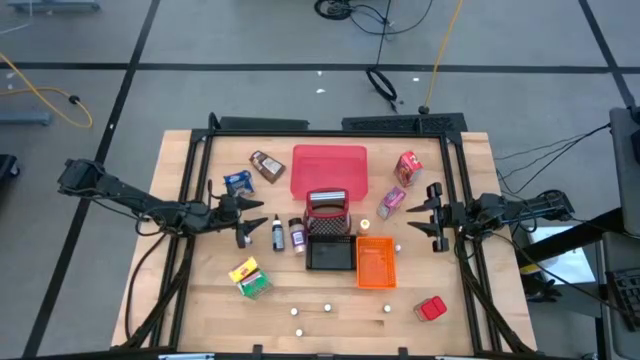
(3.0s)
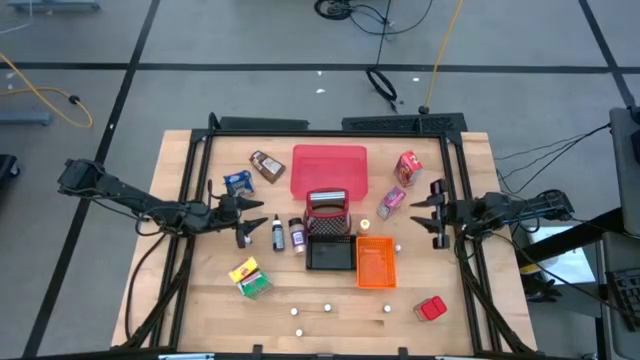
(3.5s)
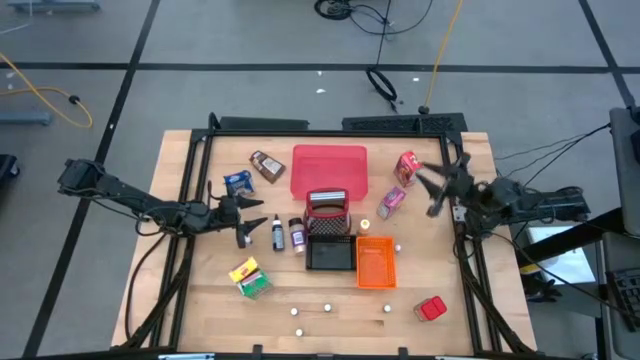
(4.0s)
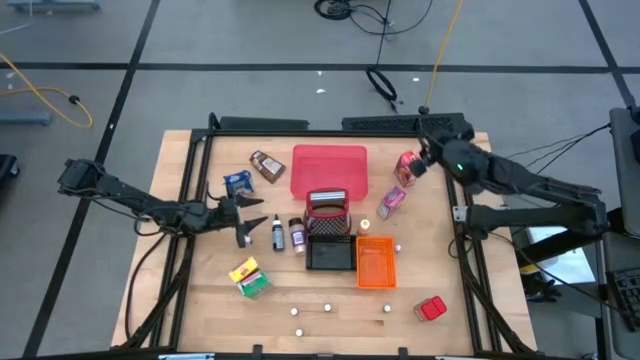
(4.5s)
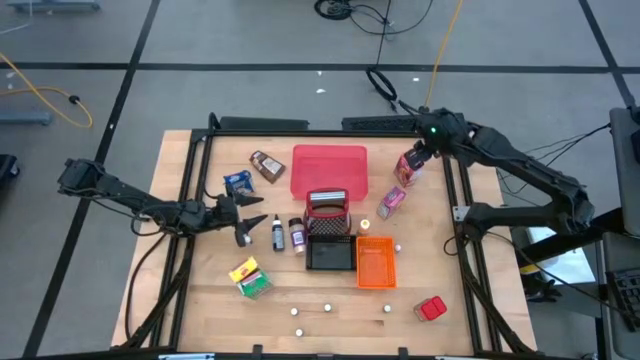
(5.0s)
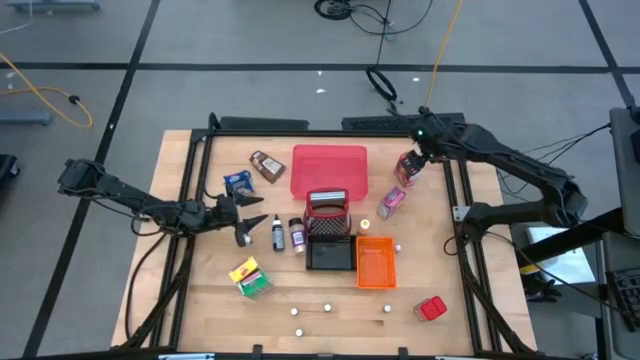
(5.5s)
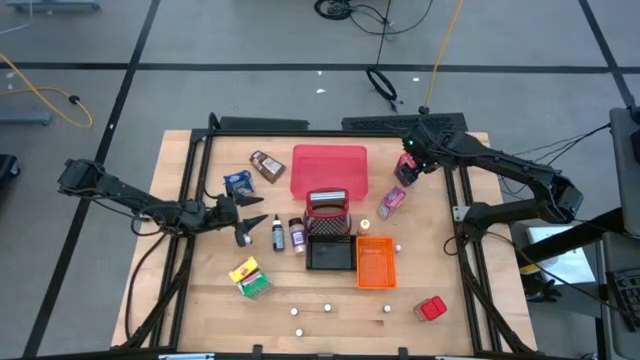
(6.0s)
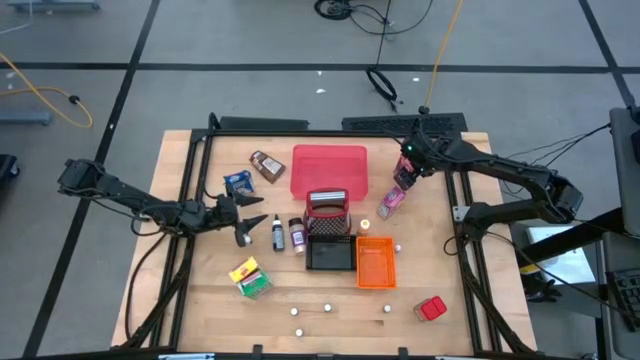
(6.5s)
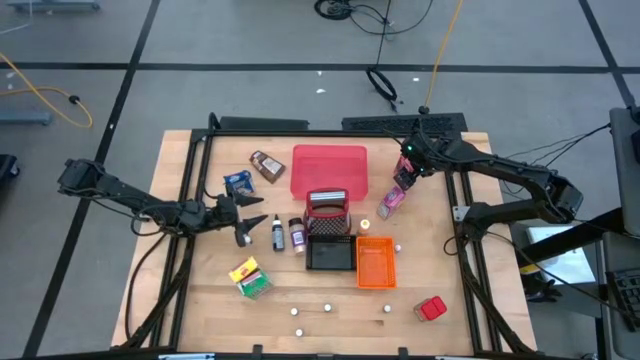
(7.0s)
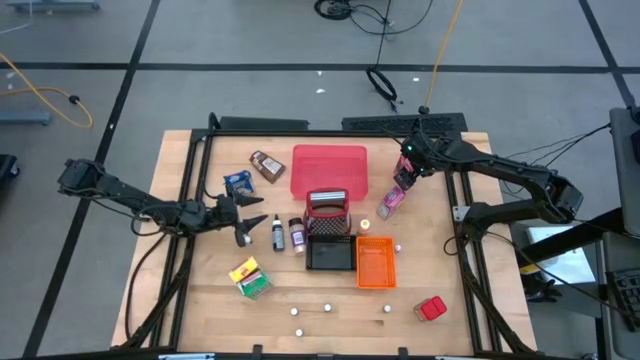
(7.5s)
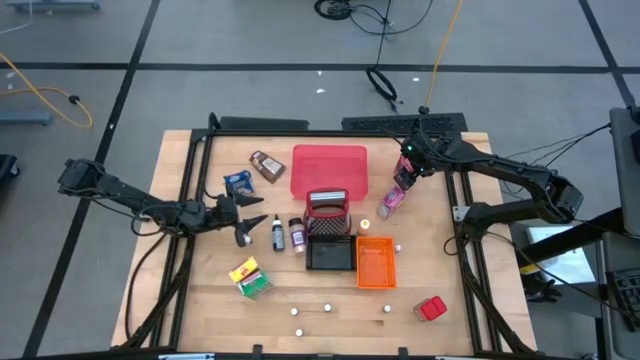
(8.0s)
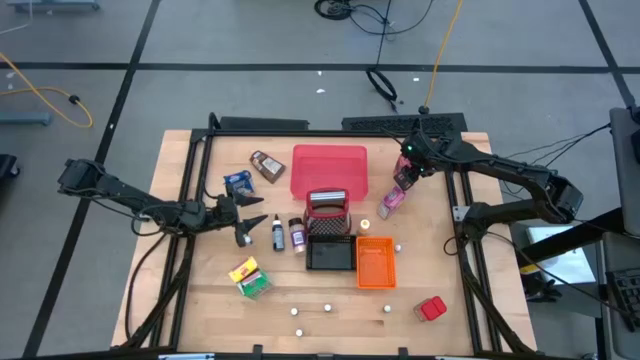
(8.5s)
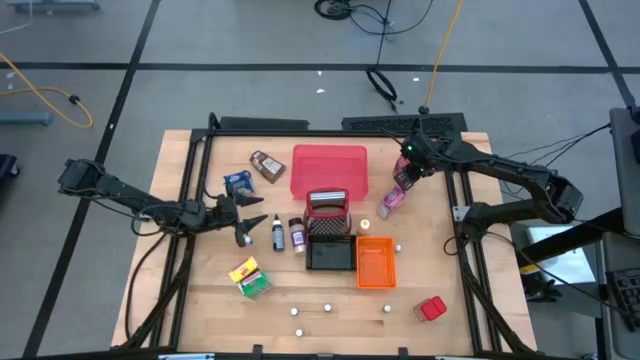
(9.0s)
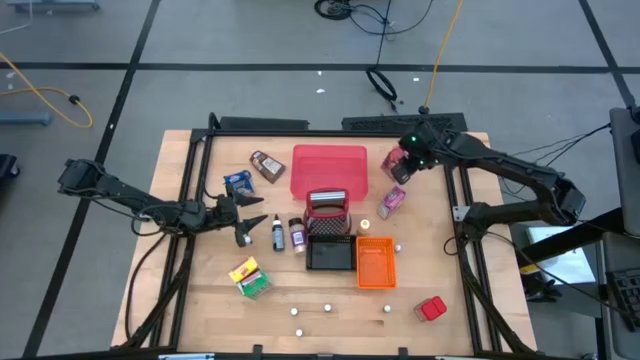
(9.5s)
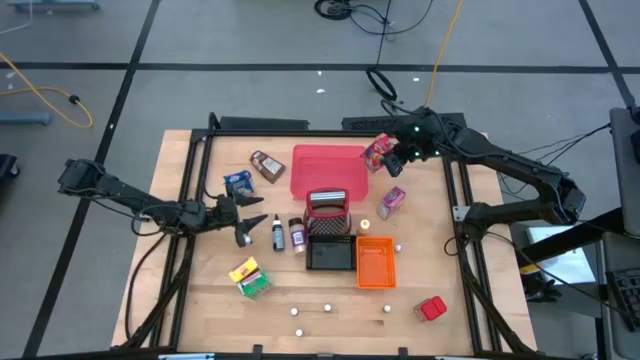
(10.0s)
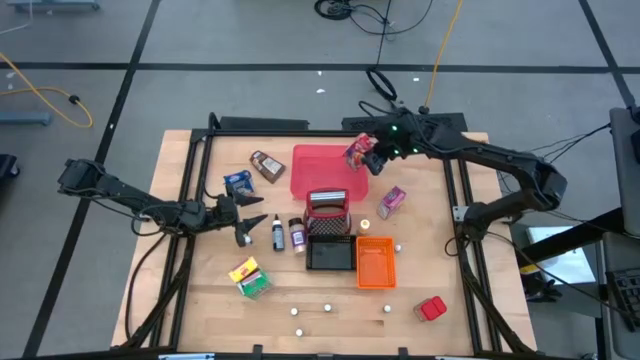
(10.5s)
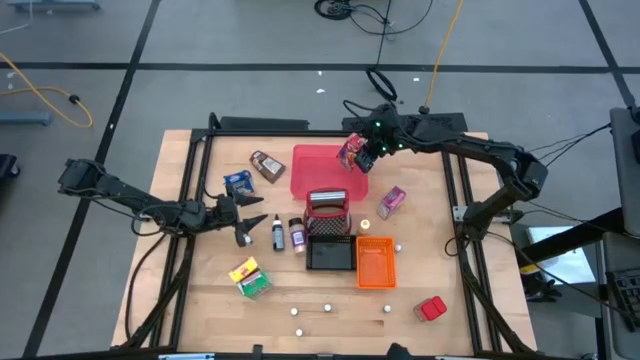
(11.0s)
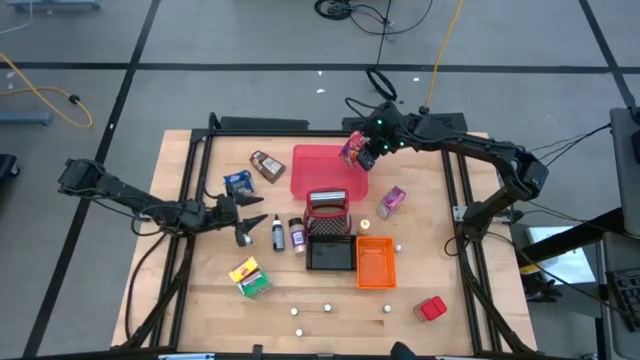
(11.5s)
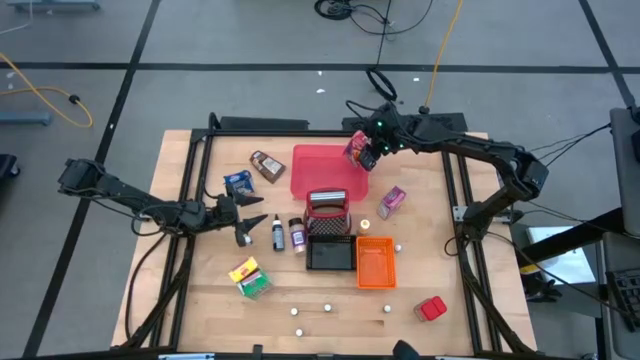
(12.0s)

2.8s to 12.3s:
Task: Pick & Place Kitchen Items
Put the red cereal box into the red bin

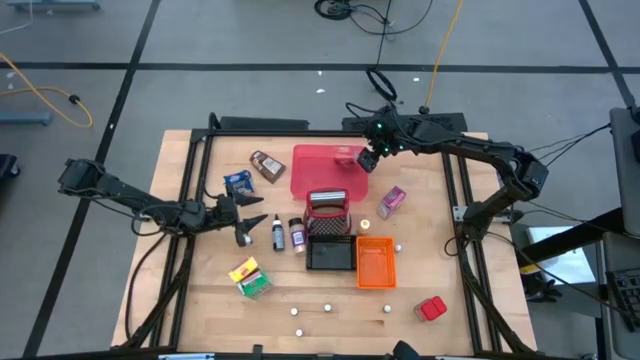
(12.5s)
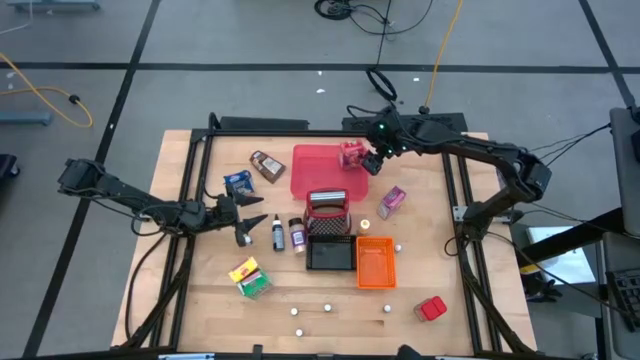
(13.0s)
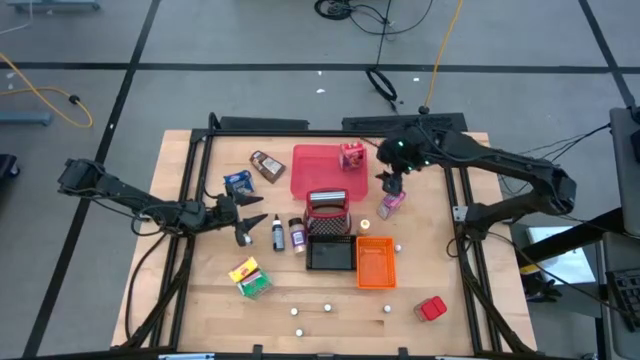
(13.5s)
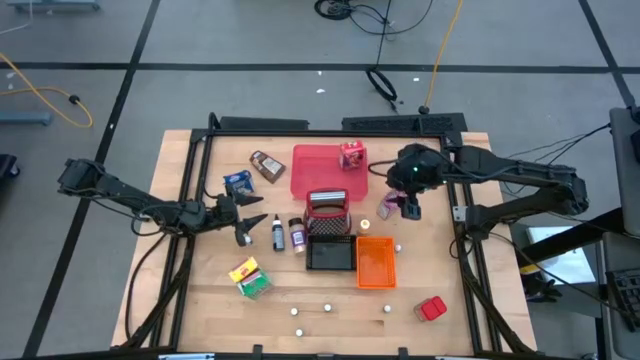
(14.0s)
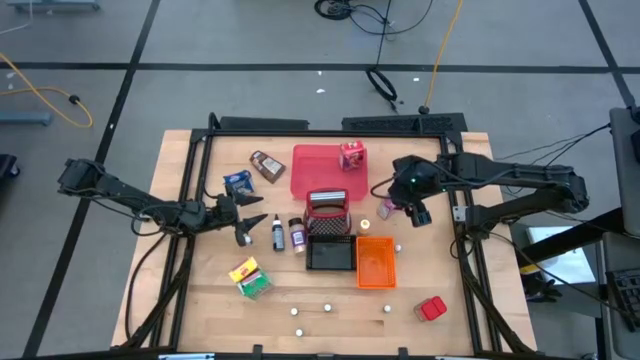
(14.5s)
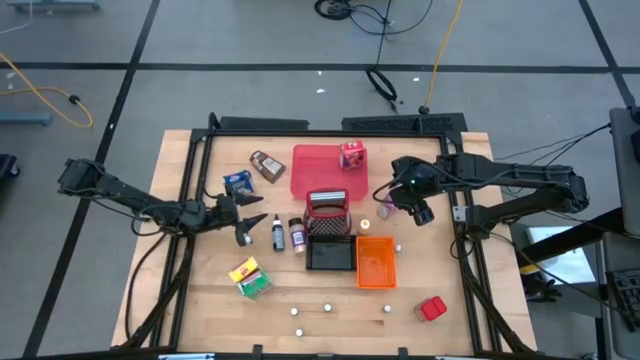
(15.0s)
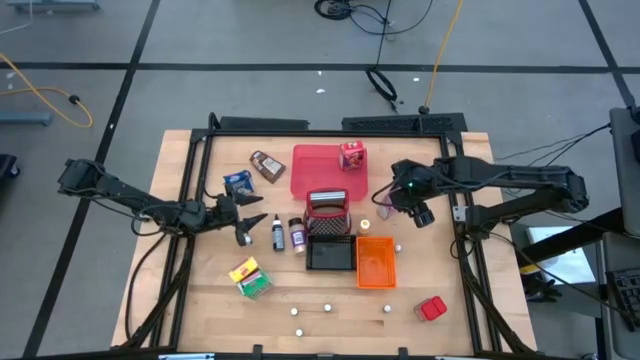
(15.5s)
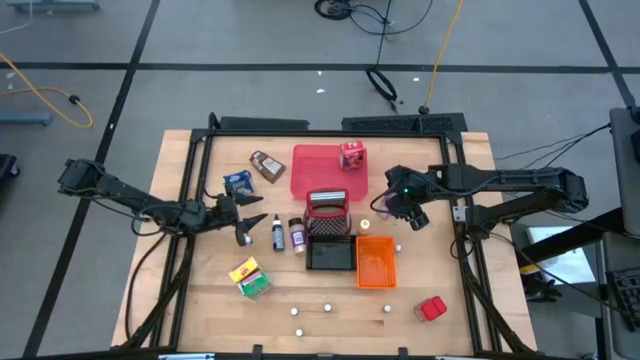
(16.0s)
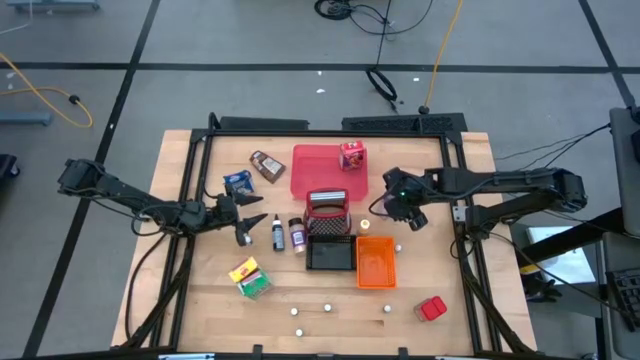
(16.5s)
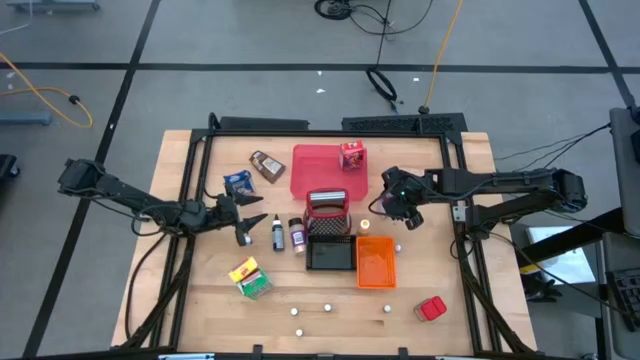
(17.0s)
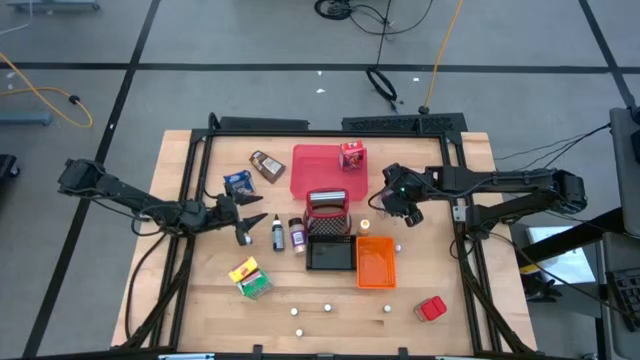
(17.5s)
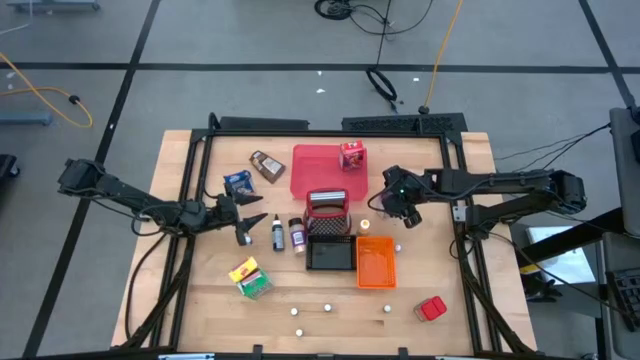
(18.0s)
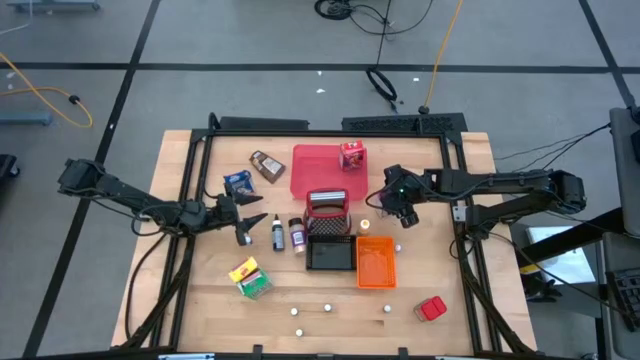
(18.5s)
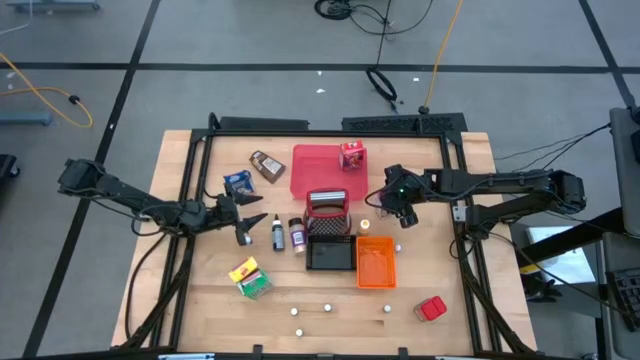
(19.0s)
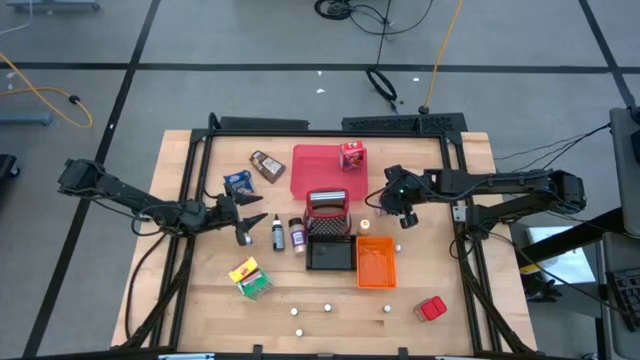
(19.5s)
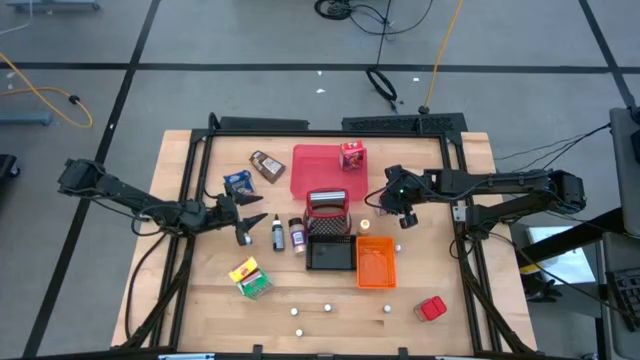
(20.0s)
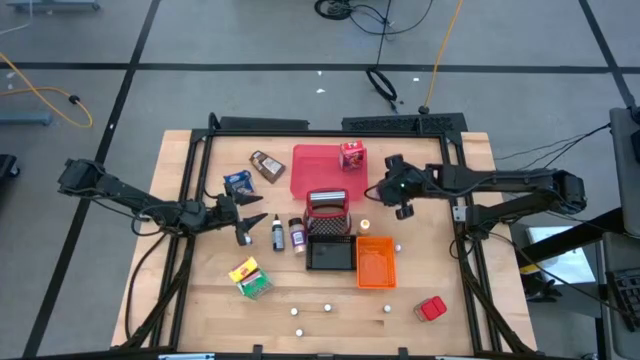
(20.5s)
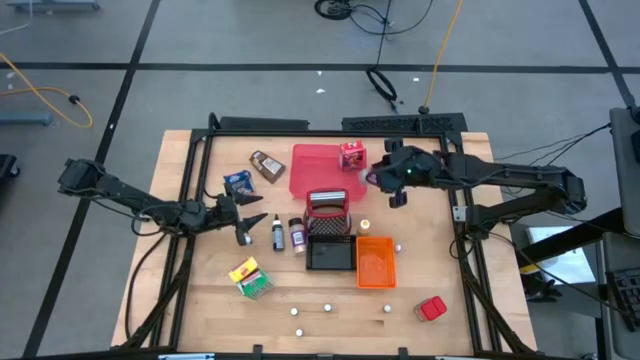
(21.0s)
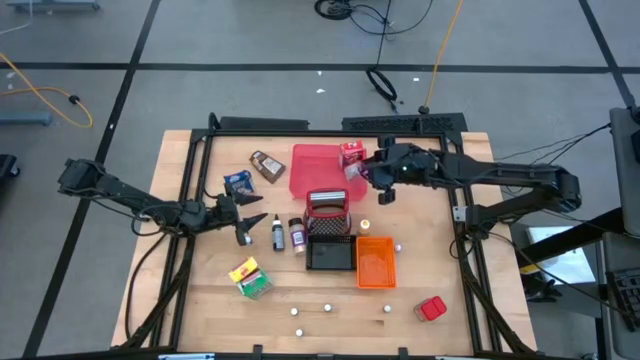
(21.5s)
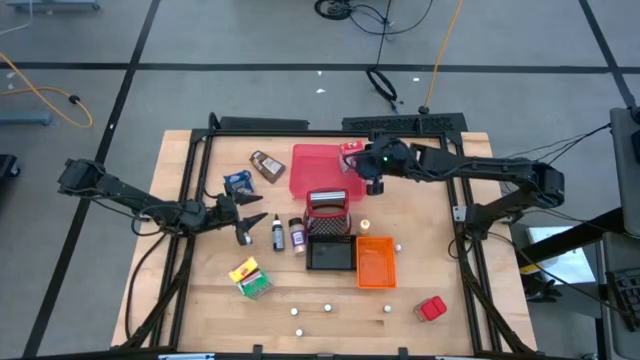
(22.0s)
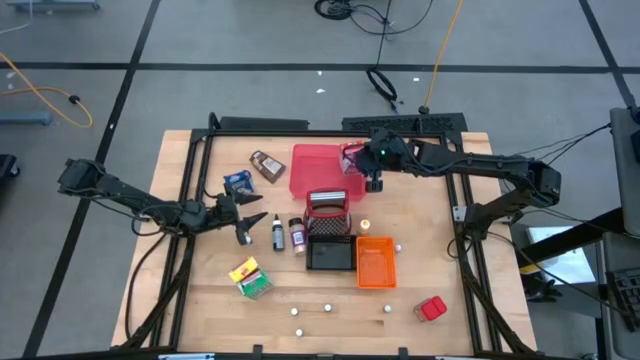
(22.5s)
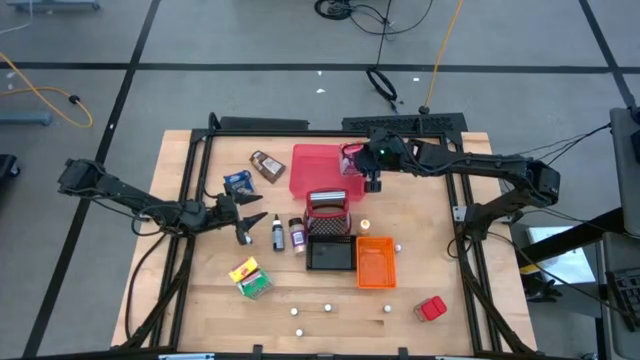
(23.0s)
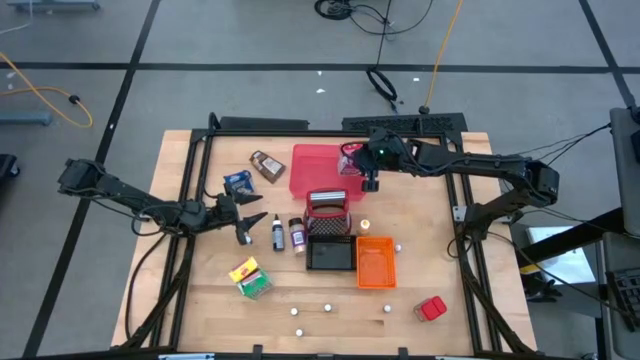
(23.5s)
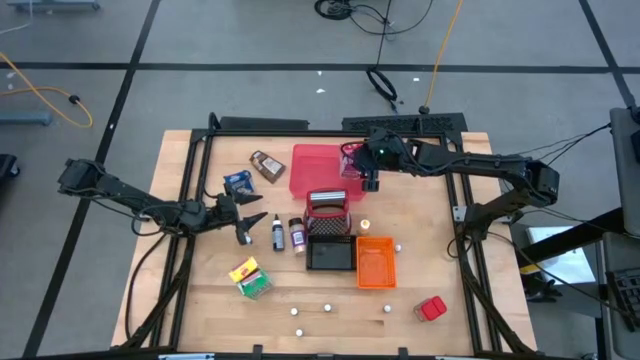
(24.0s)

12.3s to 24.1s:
Put the purple cereal box into the red bin

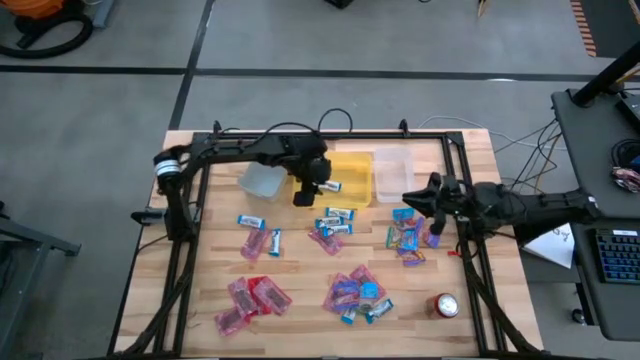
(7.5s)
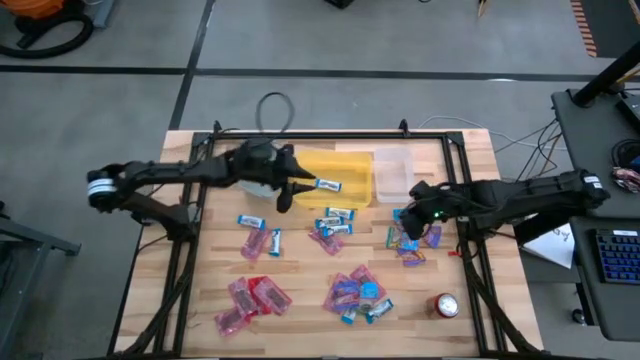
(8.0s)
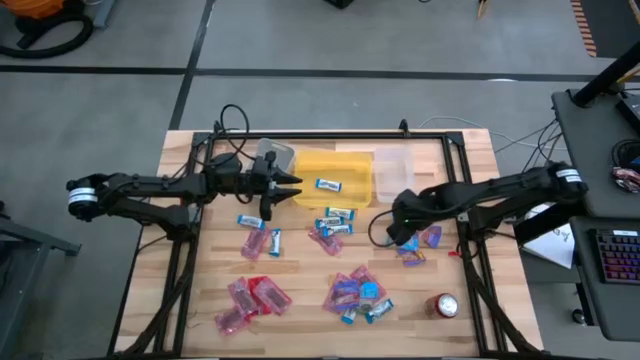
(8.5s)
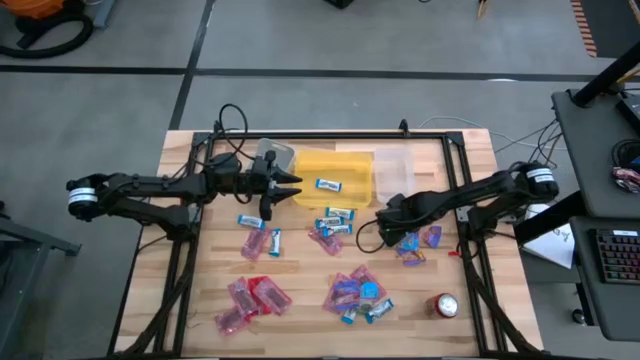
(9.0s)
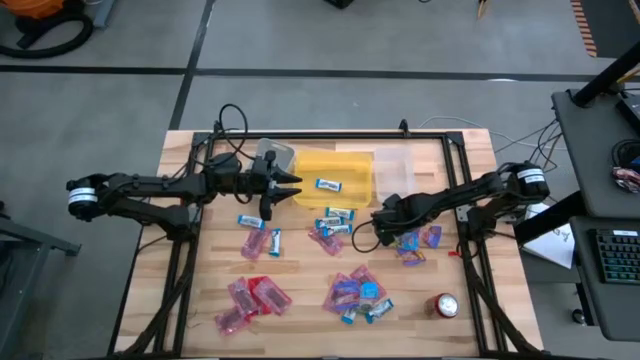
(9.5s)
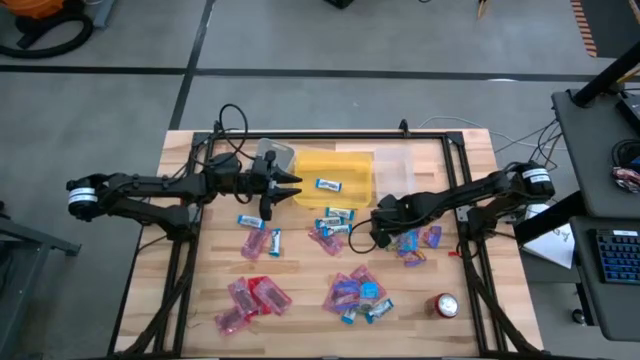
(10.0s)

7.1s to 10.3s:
Task: Sort candy
Put the blue candy into the gray bin
